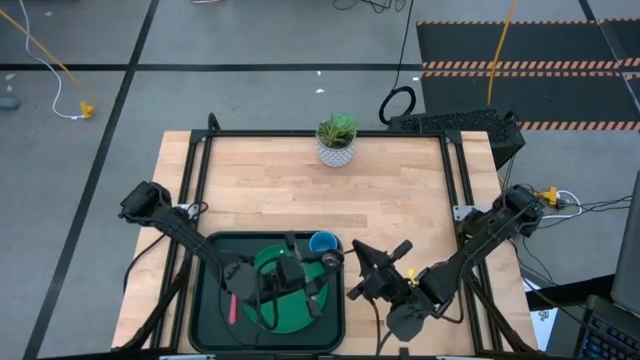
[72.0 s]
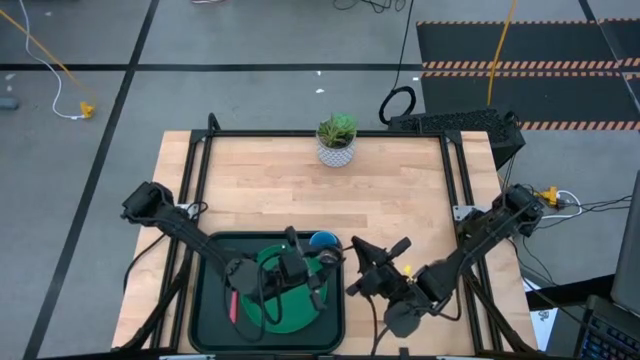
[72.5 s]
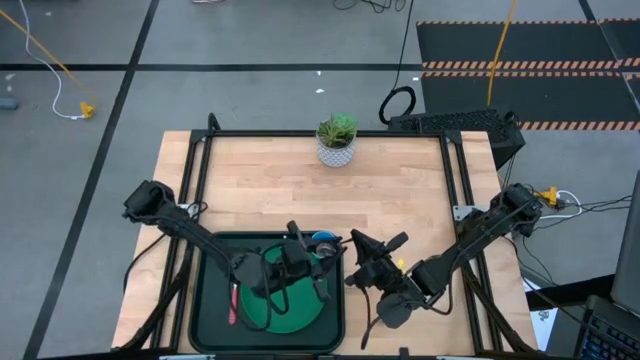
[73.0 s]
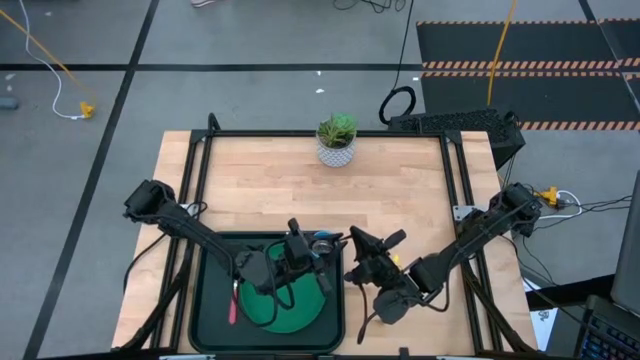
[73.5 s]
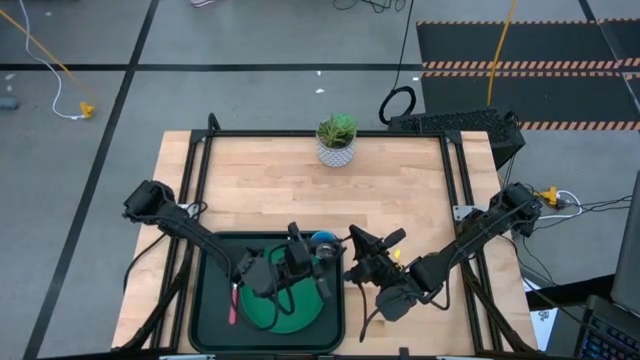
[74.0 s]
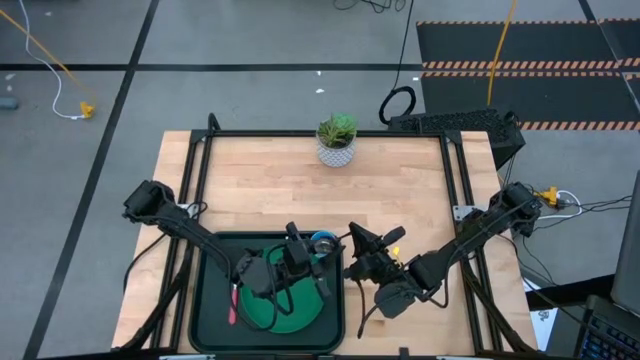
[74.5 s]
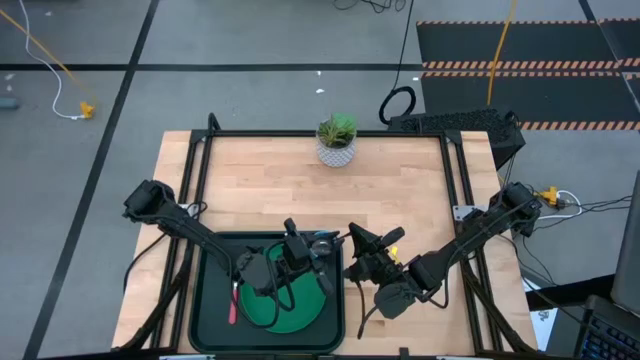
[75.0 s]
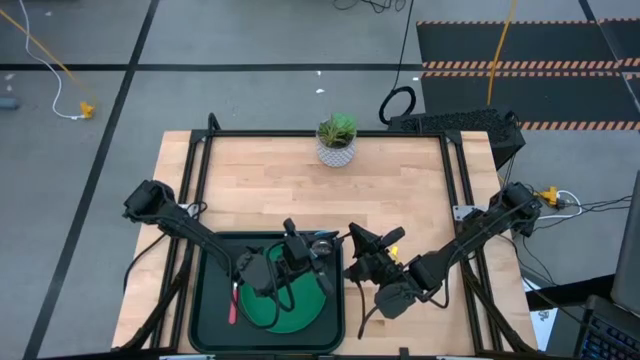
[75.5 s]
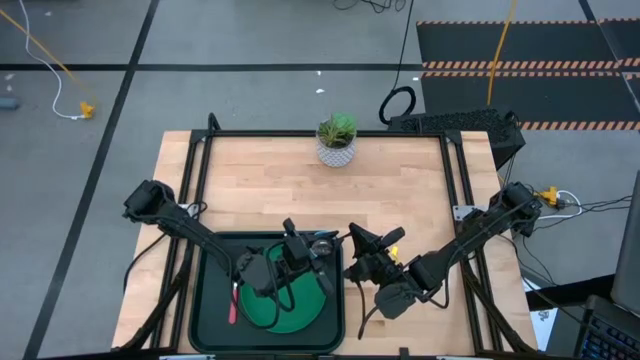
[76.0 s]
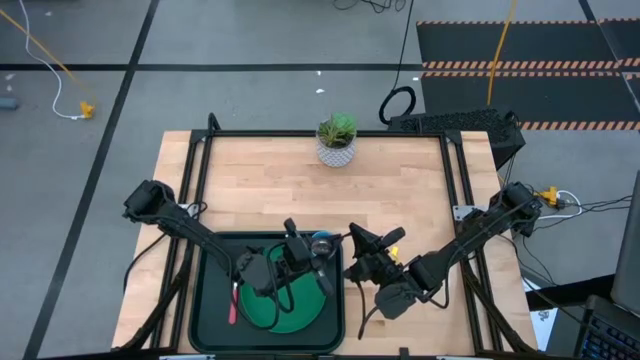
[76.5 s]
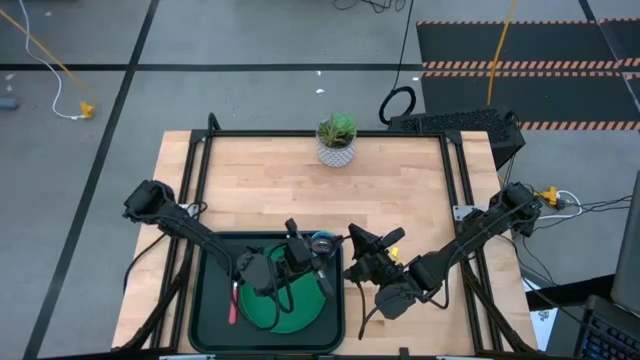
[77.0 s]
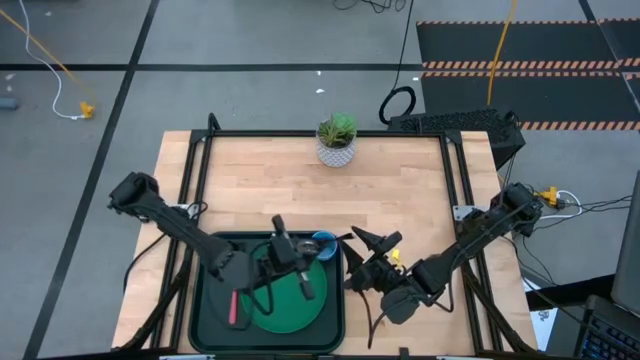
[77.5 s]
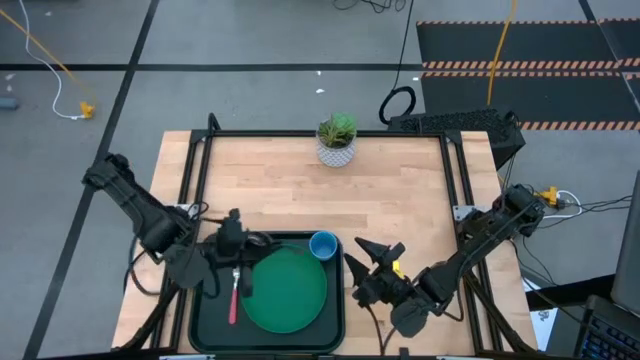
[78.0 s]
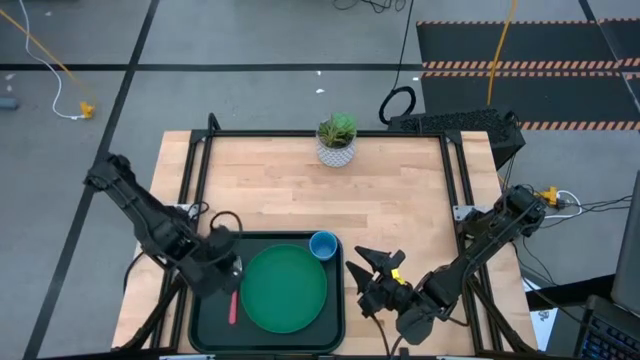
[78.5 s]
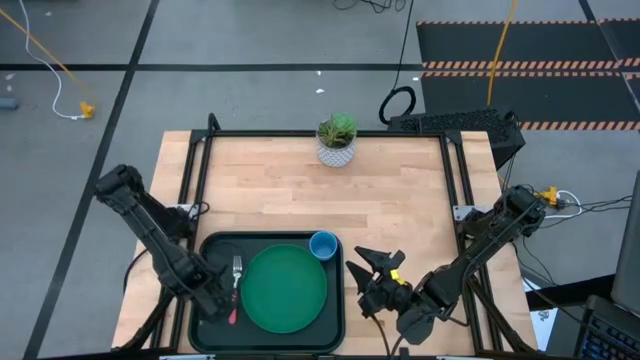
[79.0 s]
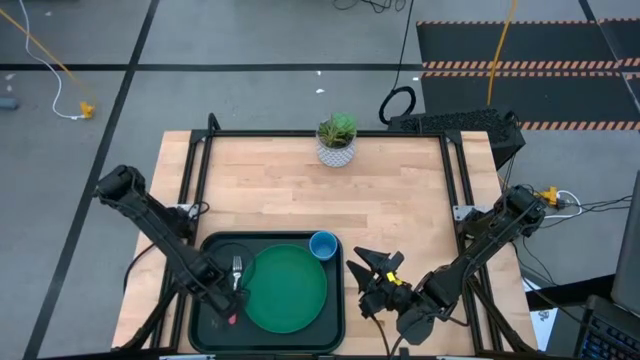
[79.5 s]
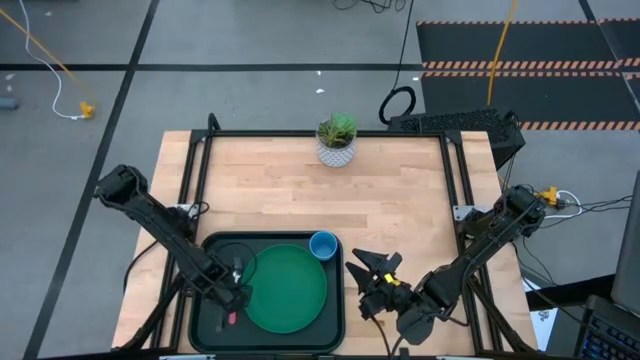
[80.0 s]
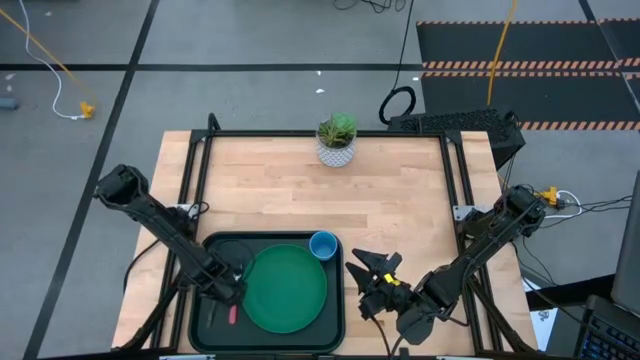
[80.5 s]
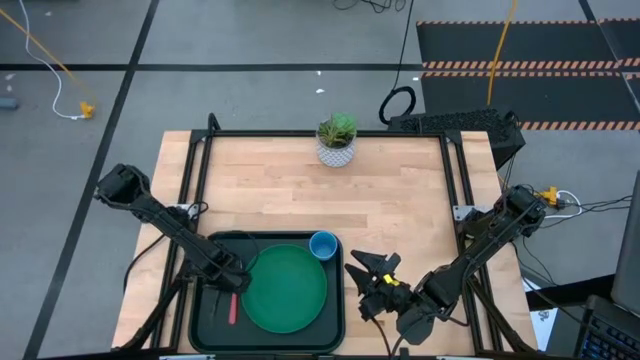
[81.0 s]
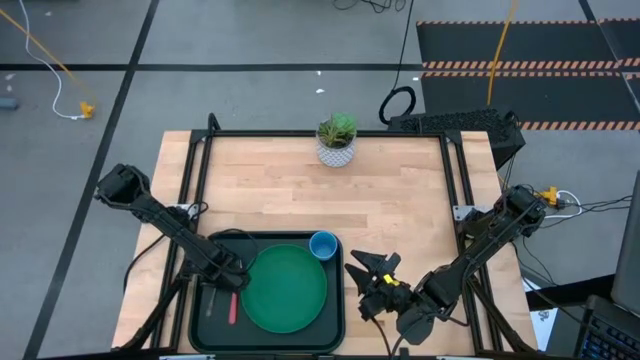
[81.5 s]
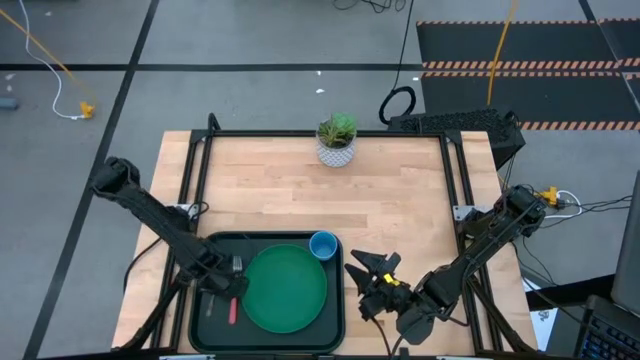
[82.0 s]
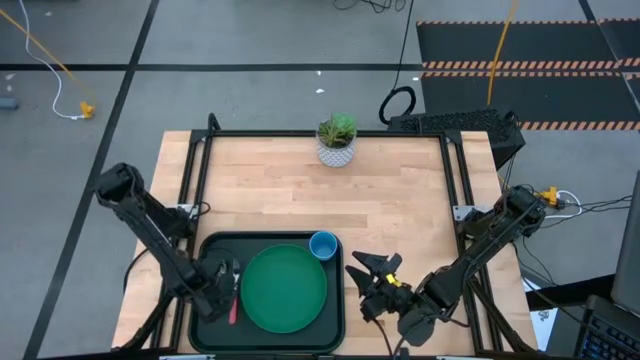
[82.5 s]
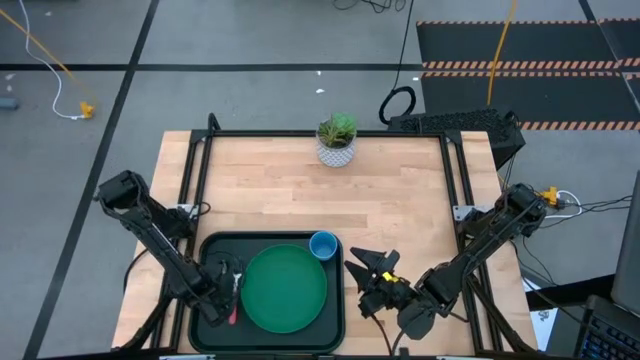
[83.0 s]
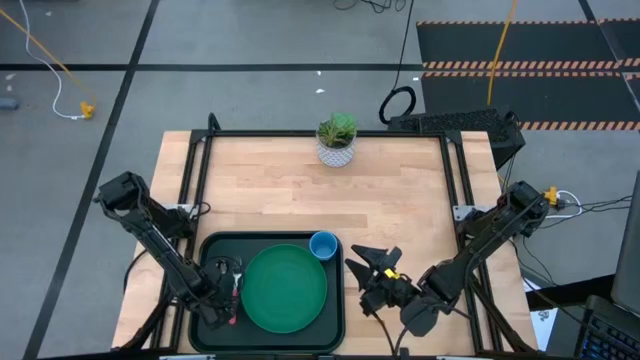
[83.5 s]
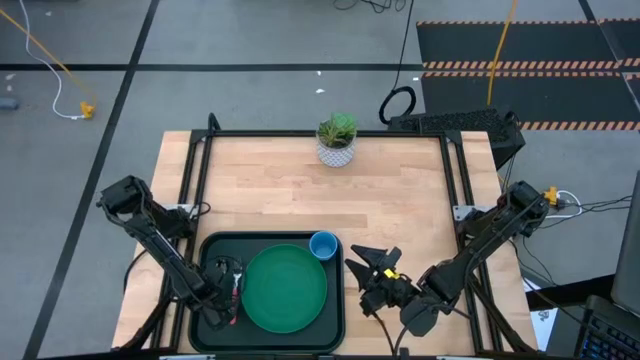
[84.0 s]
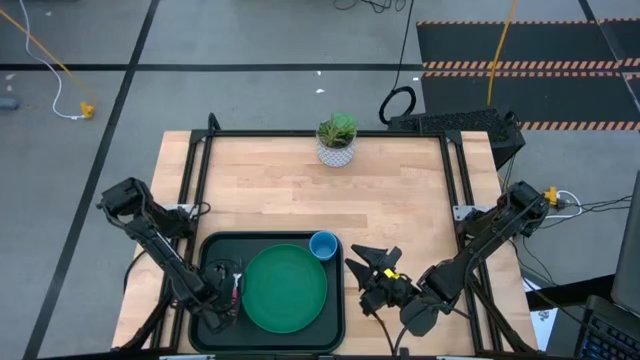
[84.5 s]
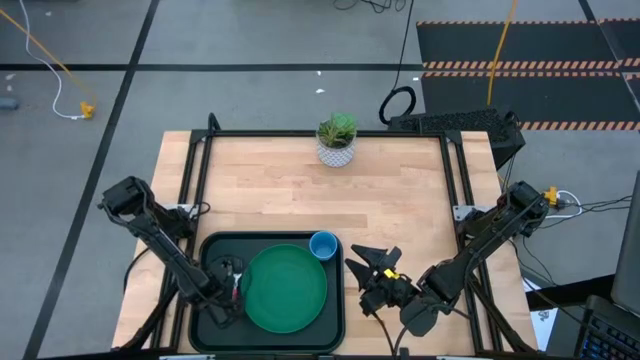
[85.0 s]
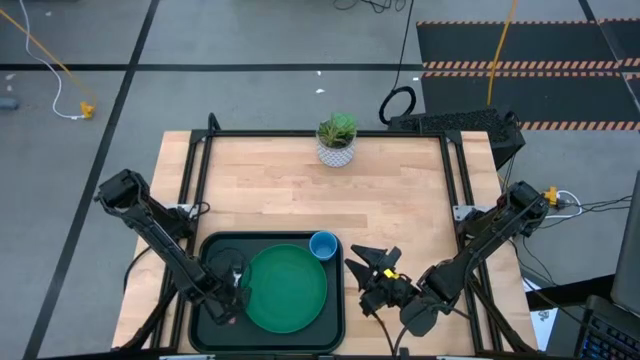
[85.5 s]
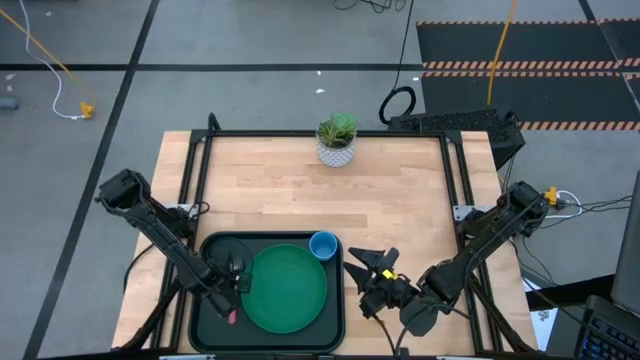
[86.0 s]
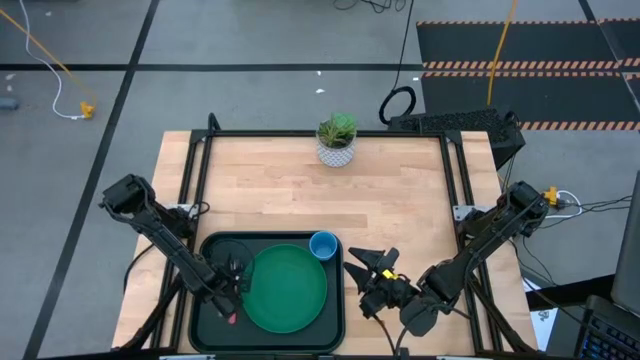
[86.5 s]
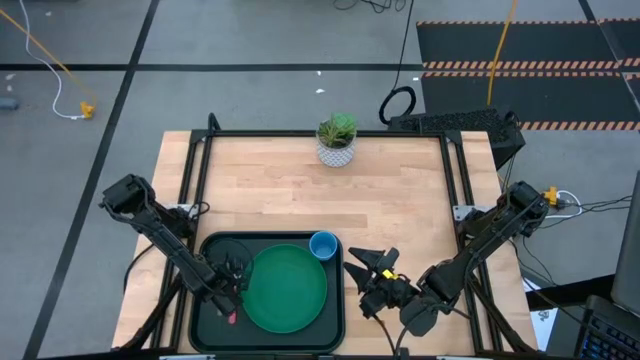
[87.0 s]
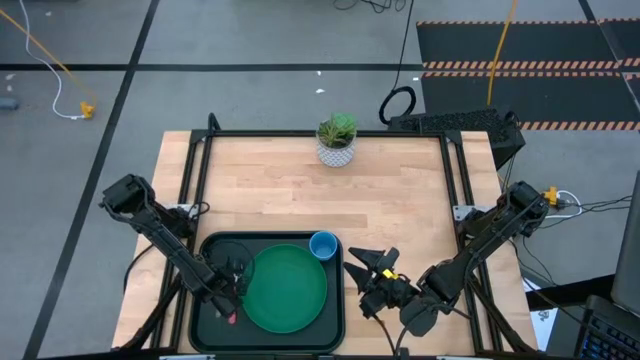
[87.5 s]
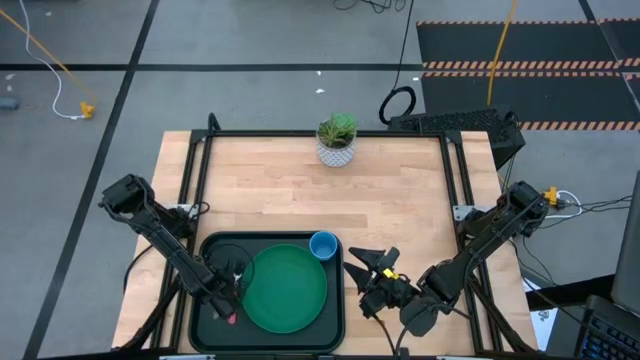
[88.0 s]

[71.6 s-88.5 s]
Task: Pick and place plate/cup/fork/spoon on tray
Put the black spoon on the black tray to the left of the red fork

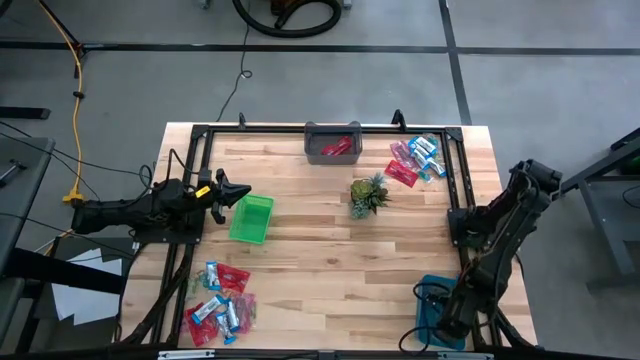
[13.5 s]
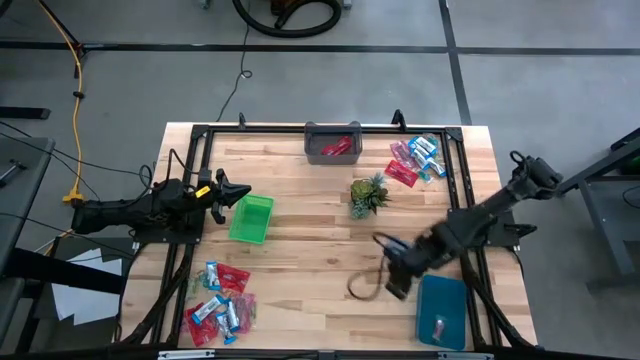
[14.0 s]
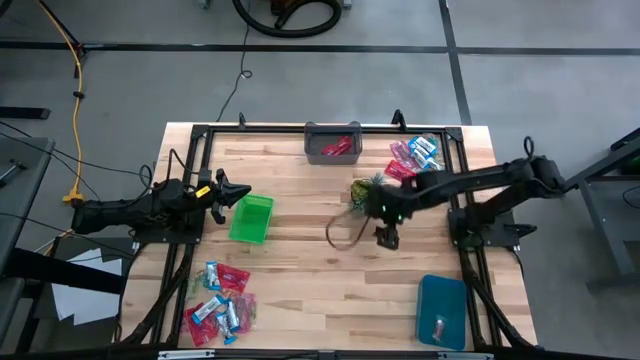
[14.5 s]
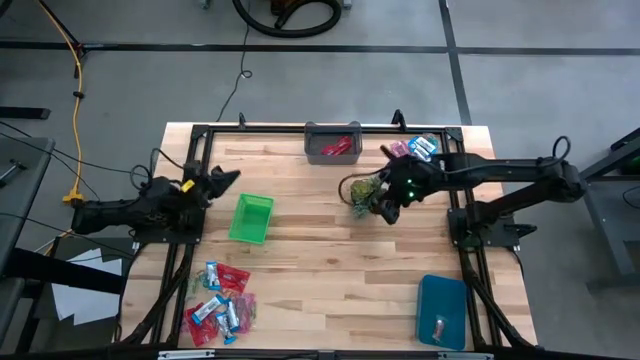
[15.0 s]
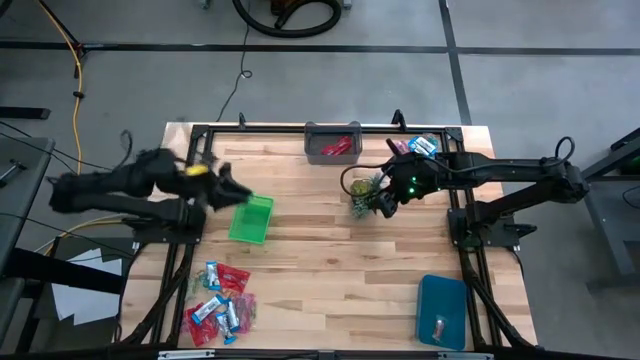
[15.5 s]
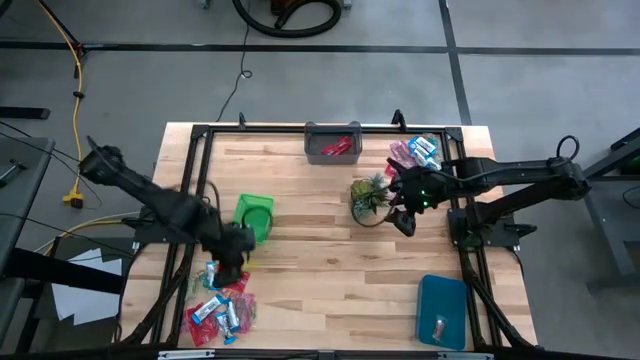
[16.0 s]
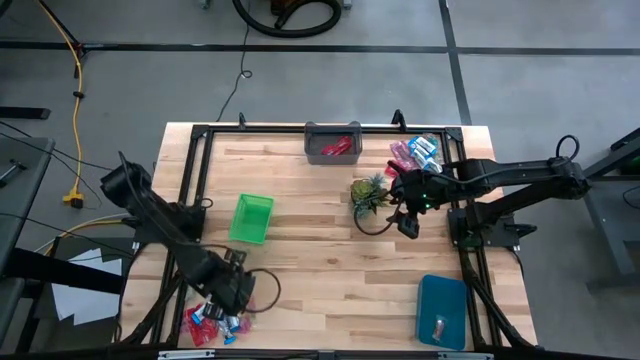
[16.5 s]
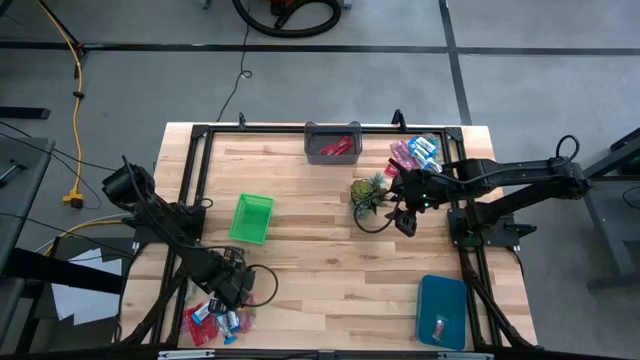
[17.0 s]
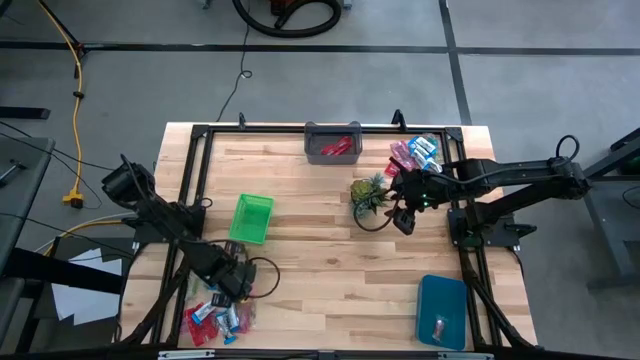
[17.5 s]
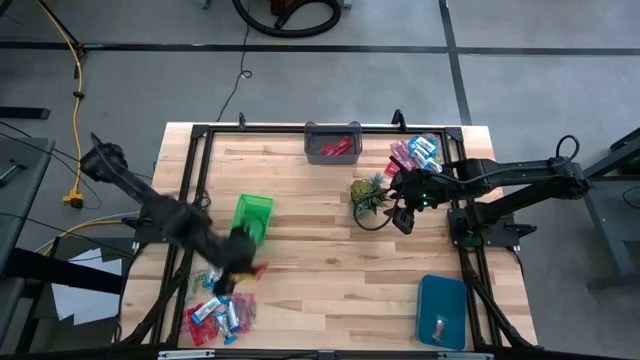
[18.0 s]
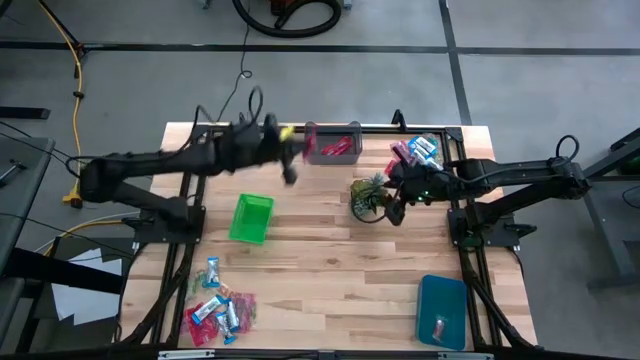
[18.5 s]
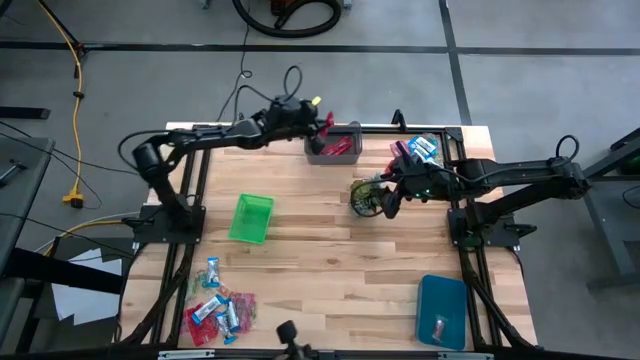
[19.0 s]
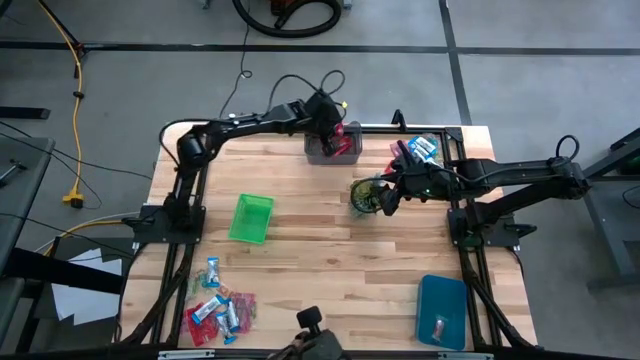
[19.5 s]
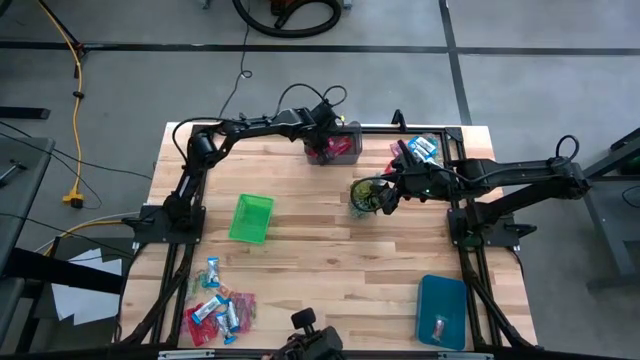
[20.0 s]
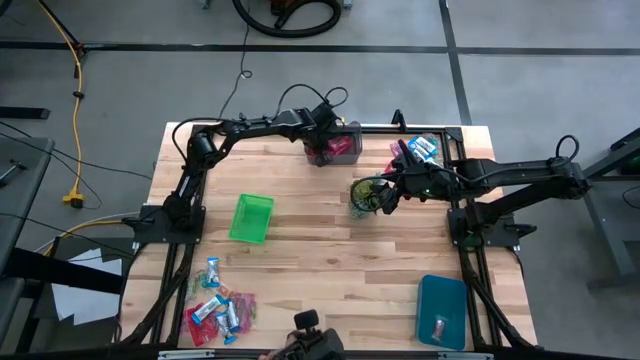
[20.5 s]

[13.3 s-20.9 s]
Task: Sort candy
Put the red candy into the black transparent bin
